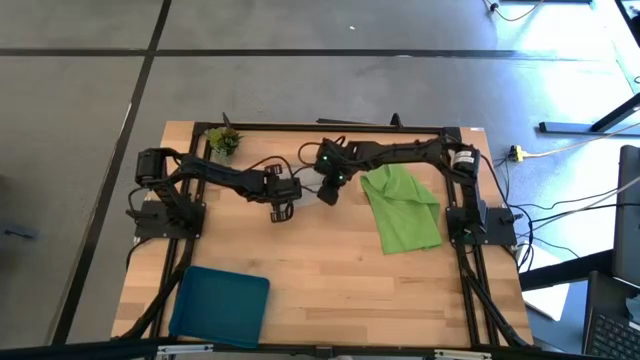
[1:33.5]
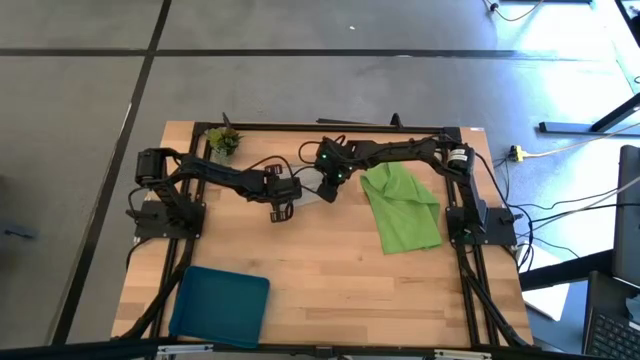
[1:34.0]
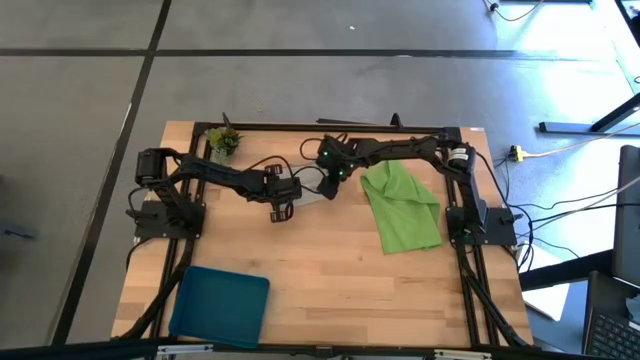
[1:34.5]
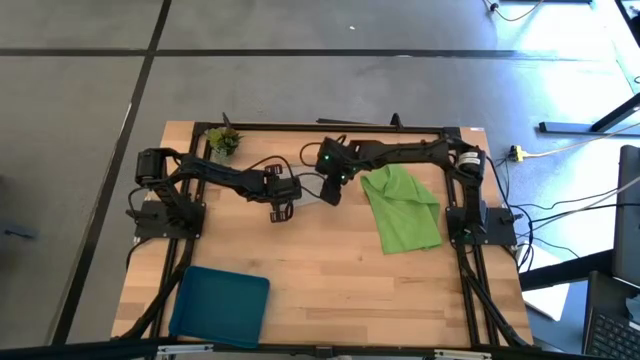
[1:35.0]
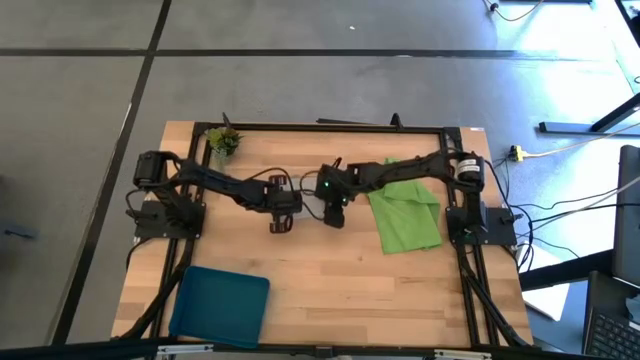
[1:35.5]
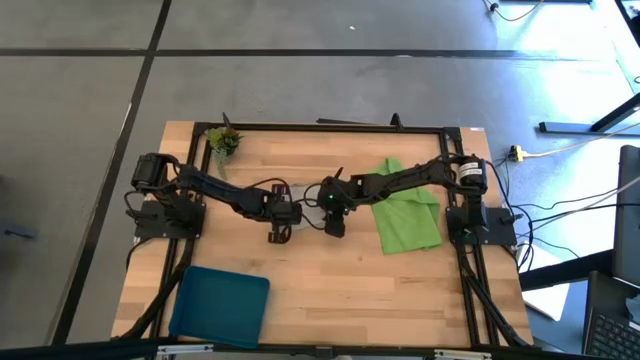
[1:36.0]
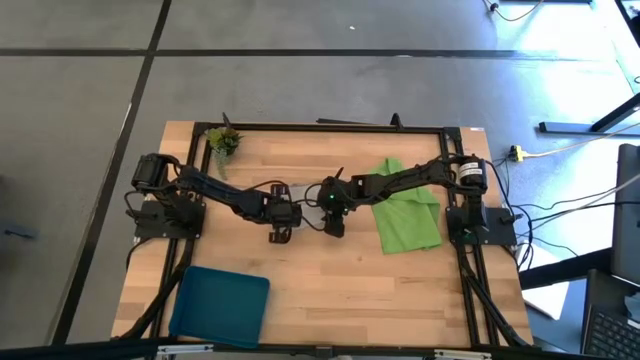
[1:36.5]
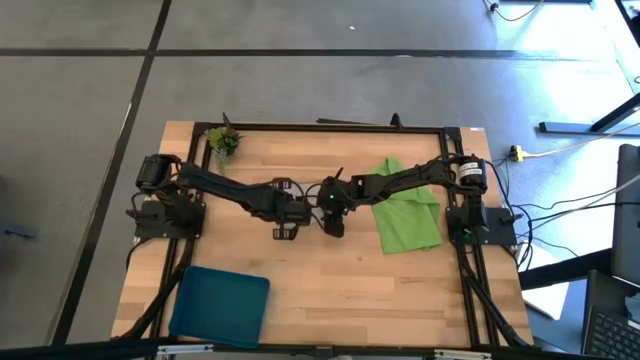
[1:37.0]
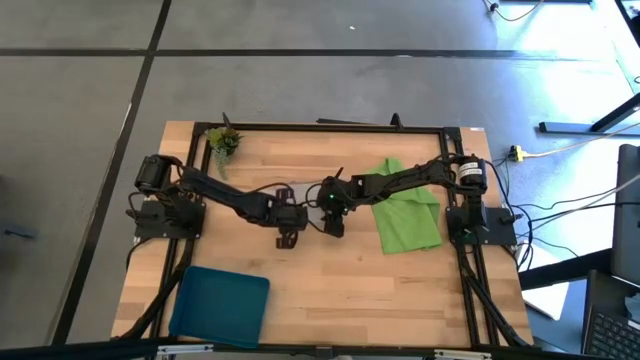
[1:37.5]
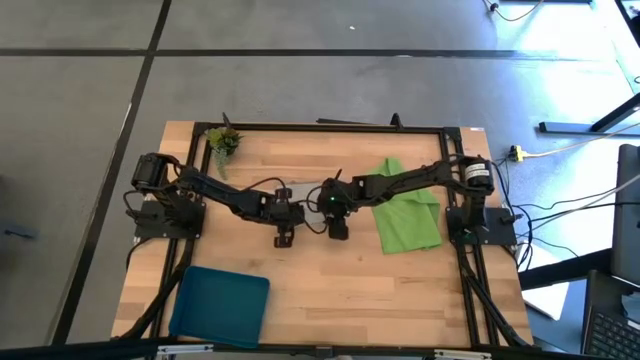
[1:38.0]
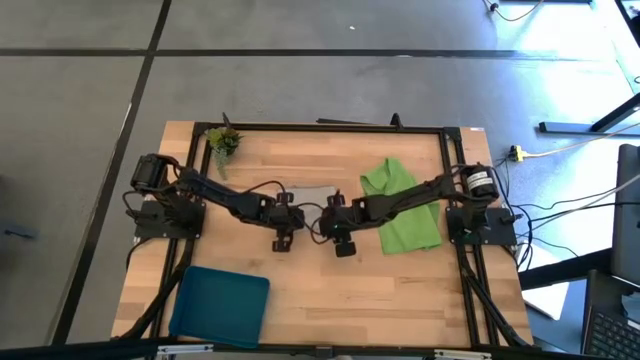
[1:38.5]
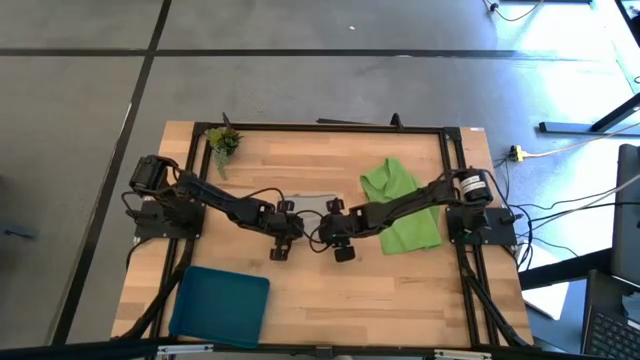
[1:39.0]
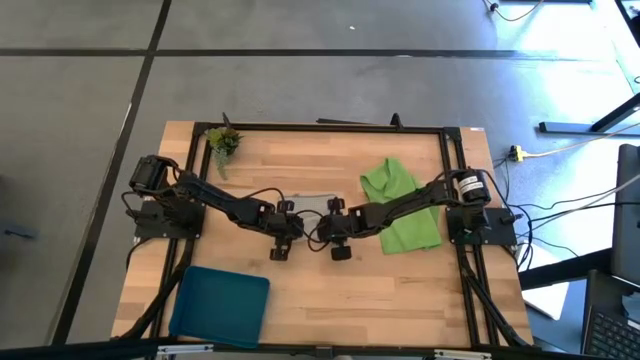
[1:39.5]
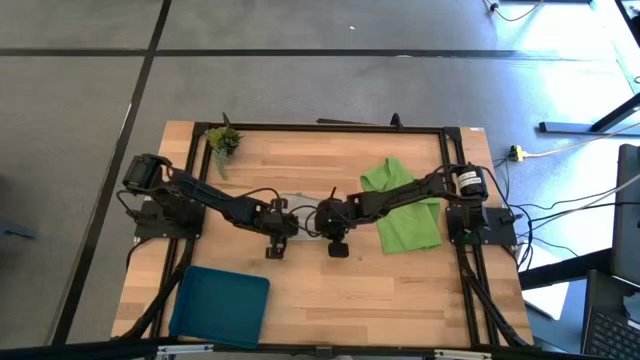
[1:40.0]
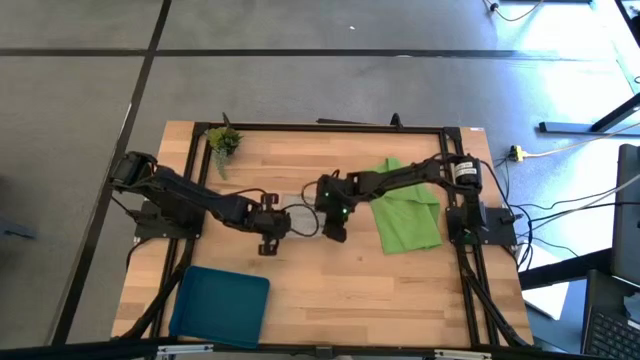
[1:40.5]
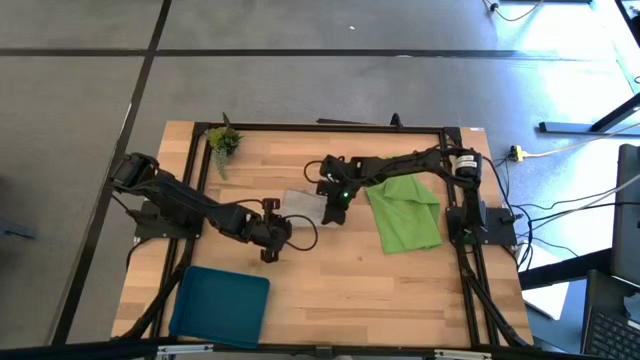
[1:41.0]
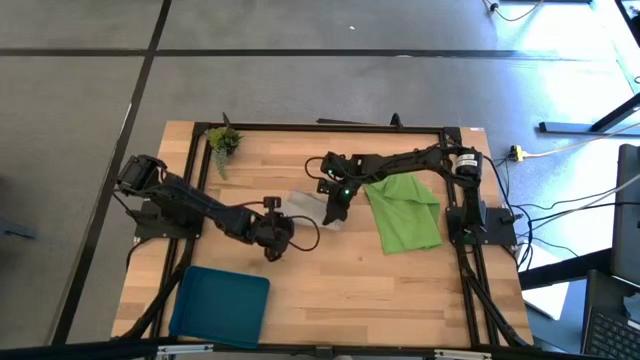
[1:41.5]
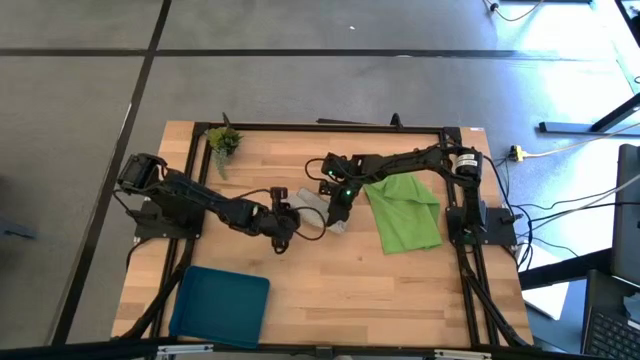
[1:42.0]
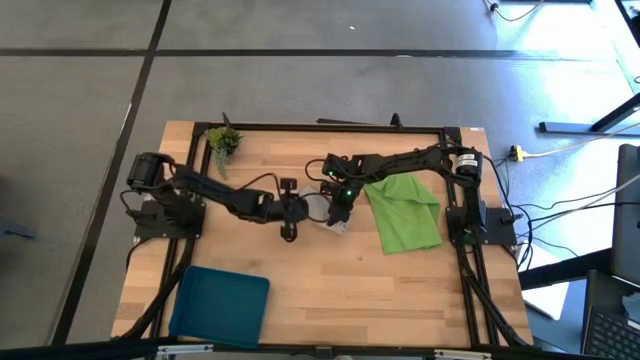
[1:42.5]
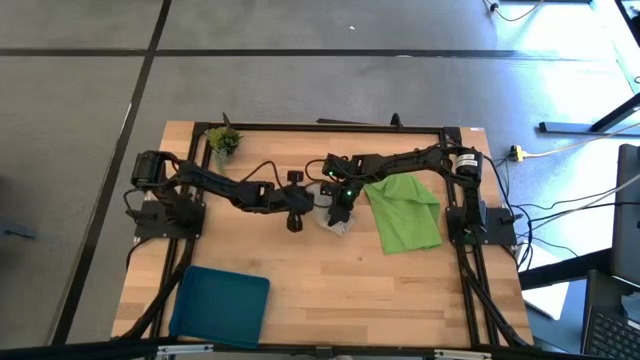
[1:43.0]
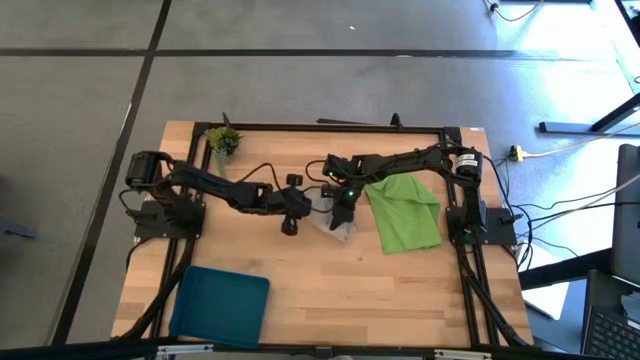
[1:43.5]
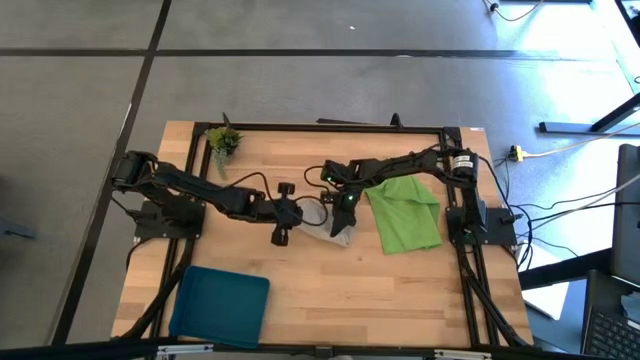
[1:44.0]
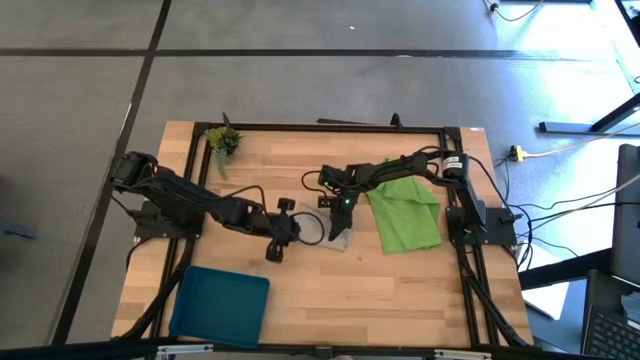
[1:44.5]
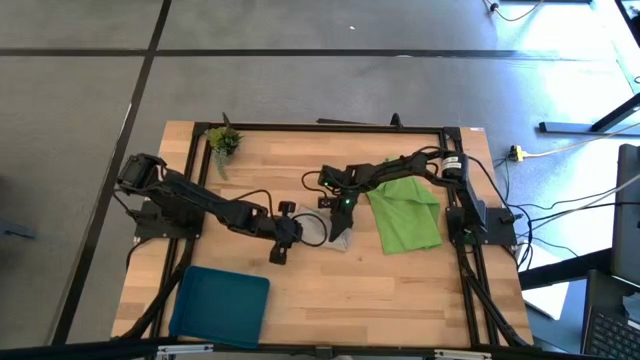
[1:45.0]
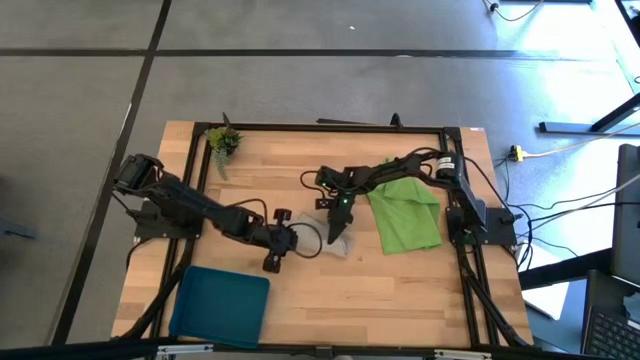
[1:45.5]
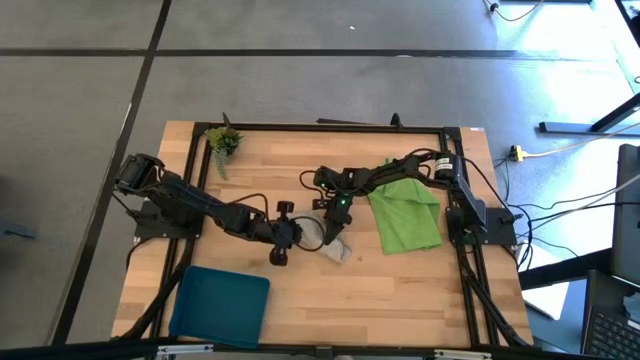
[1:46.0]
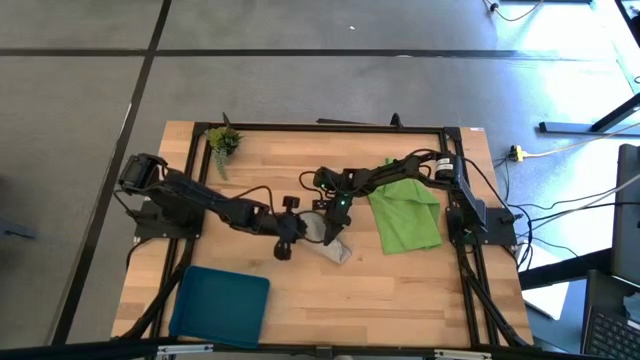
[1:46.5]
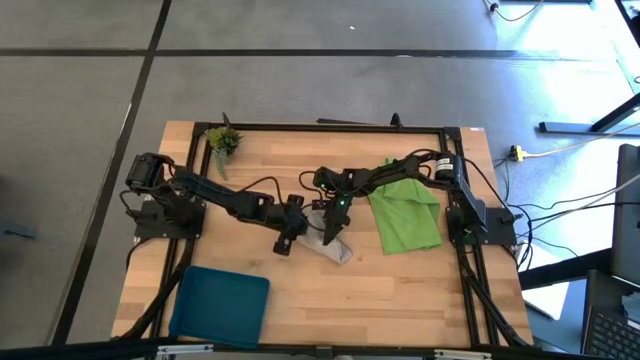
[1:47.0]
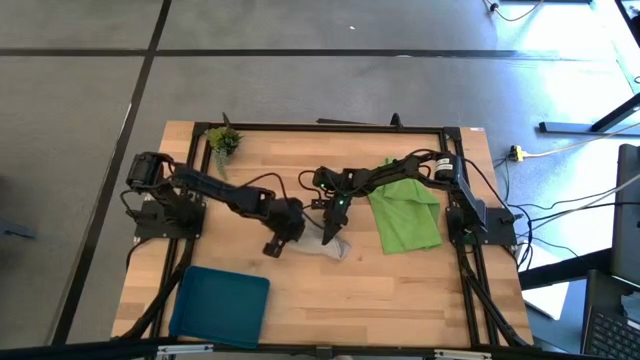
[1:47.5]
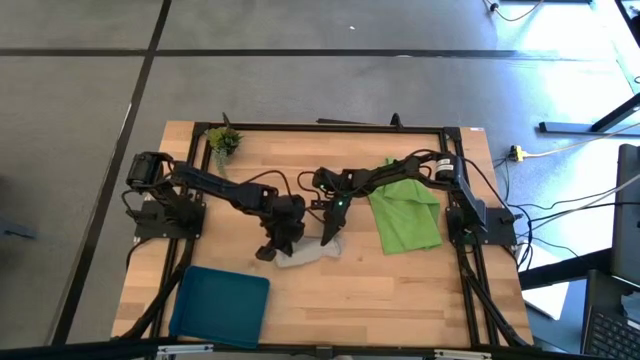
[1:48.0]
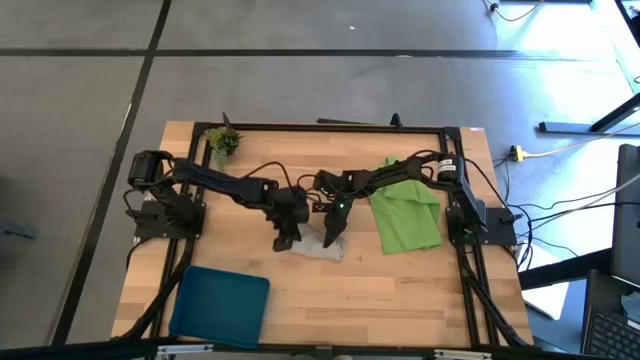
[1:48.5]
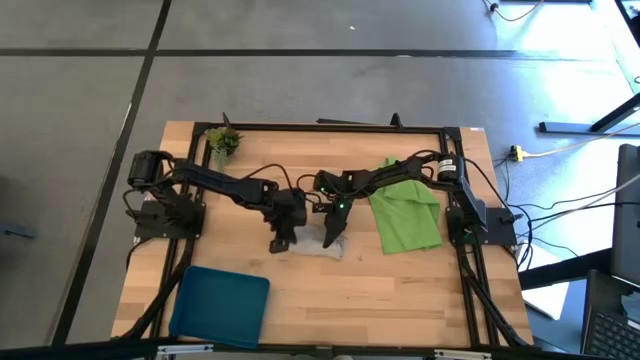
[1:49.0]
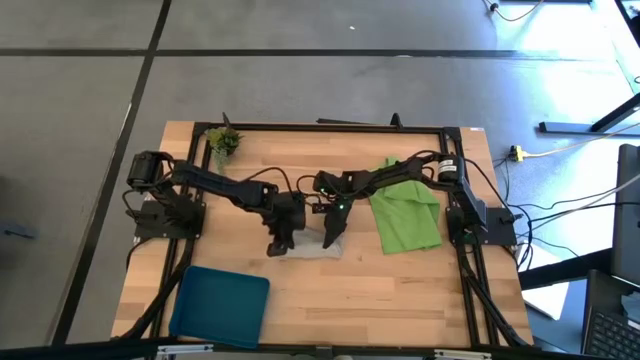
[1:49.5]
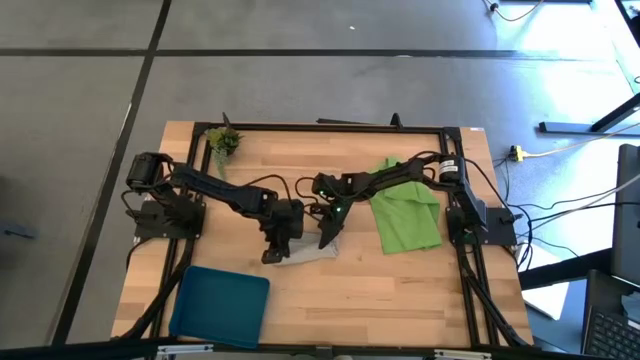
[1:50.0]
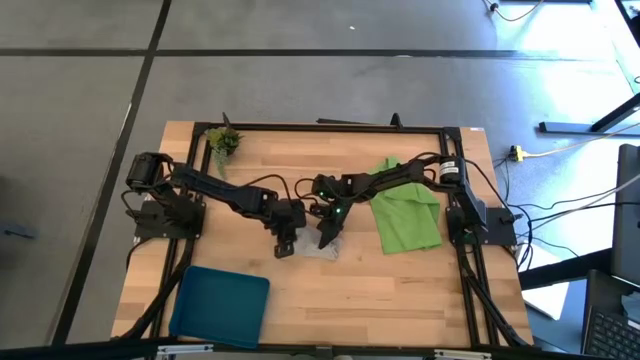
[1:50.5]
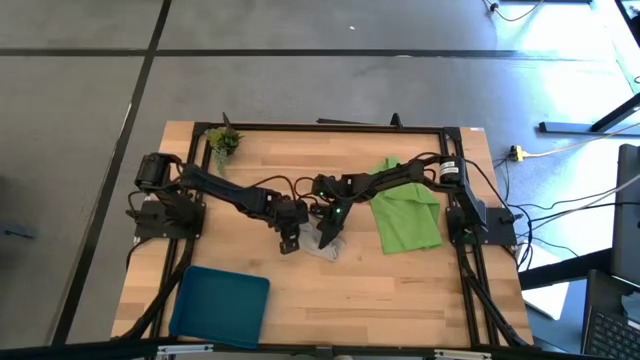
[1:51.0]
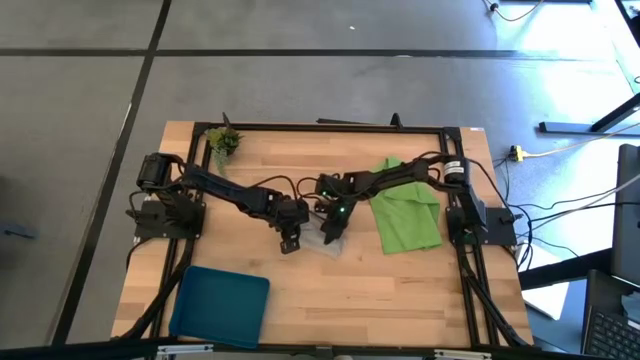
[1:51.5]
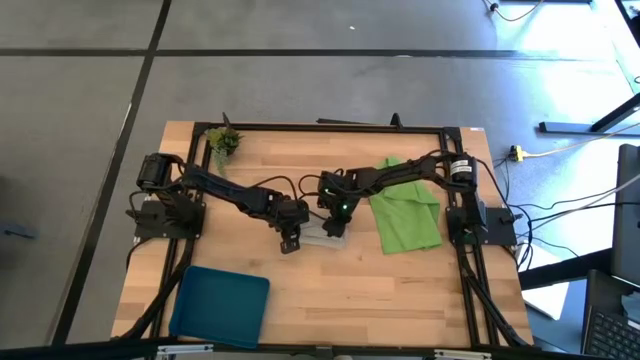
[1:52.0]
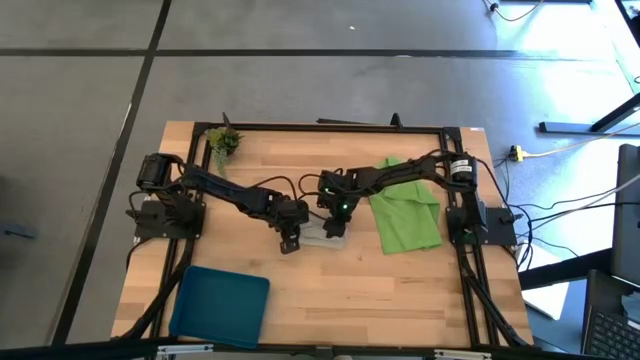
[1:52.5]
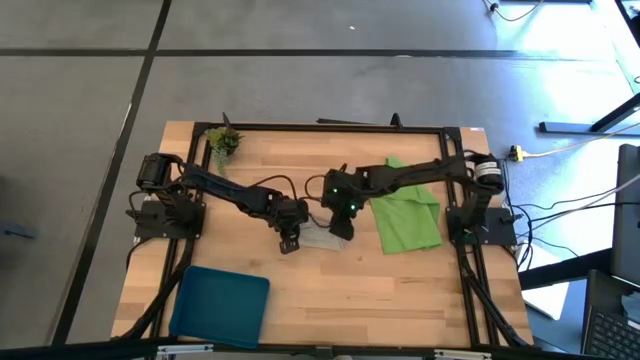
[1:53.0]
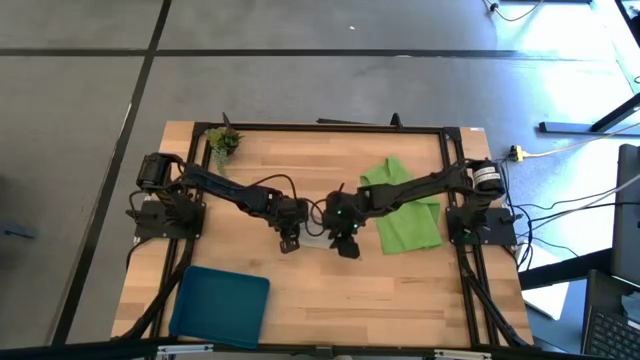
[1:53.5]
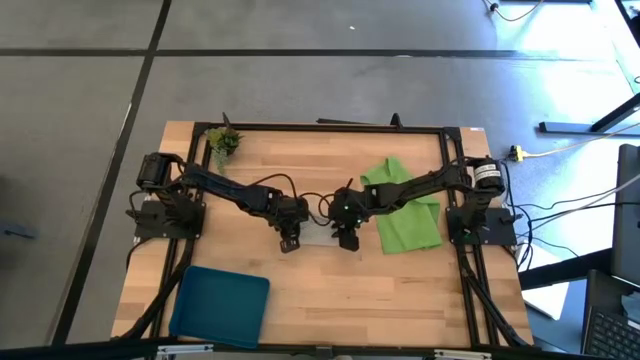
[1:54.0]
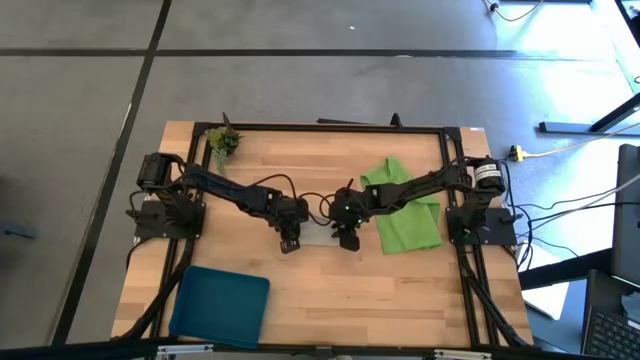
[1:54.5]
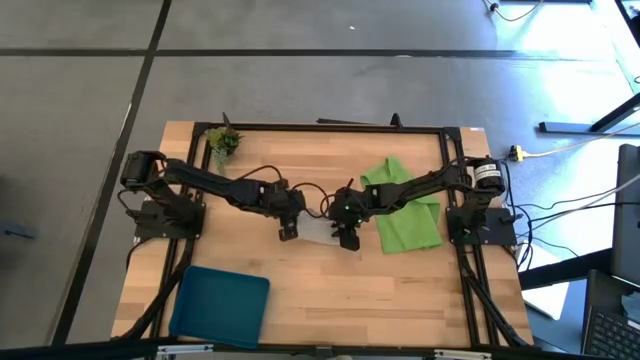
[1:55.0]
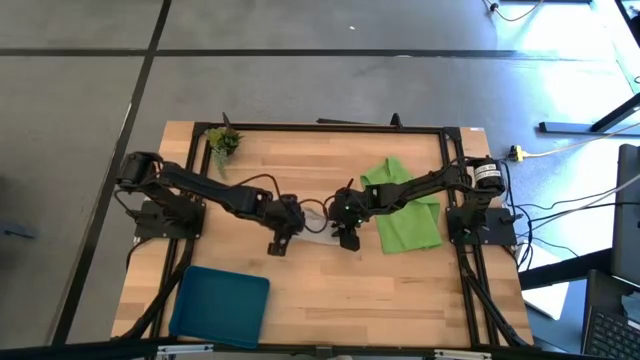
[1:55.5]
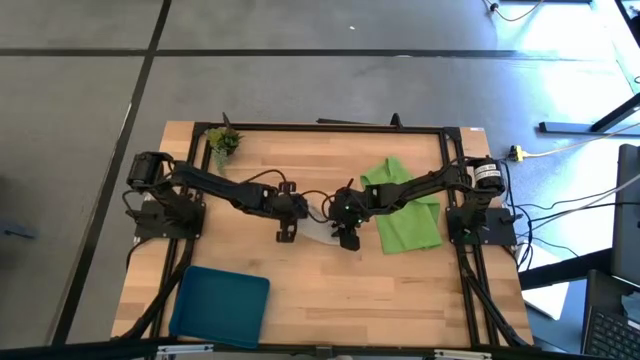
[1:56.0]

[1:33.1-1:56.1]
Task: Fold microfiber towels
Fold the gray microfiber cloth
